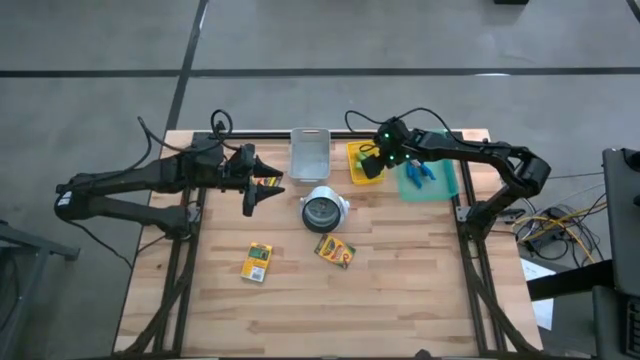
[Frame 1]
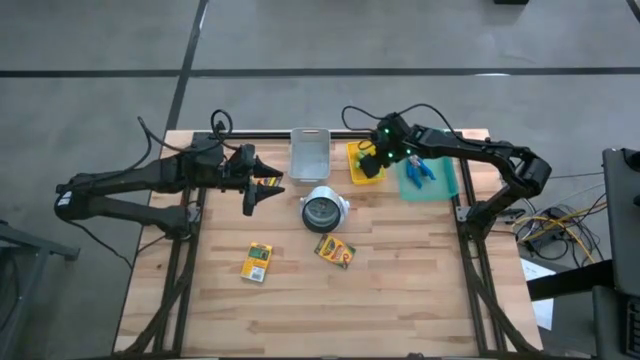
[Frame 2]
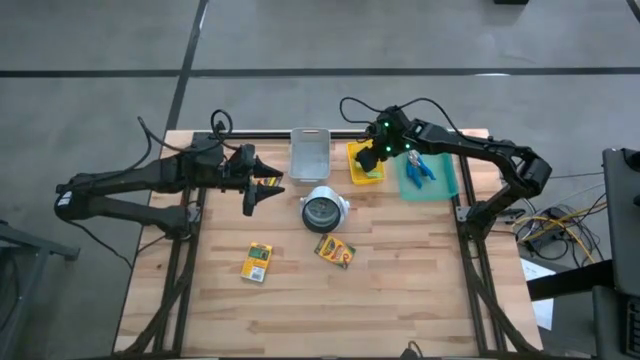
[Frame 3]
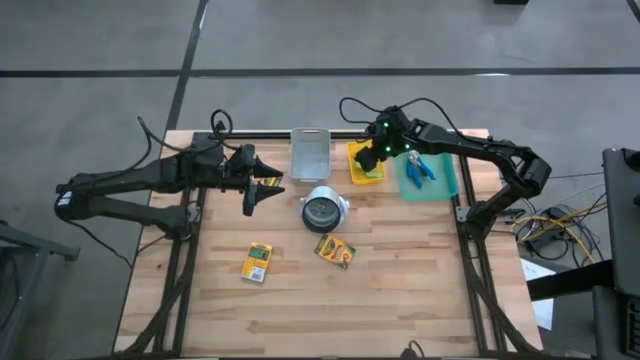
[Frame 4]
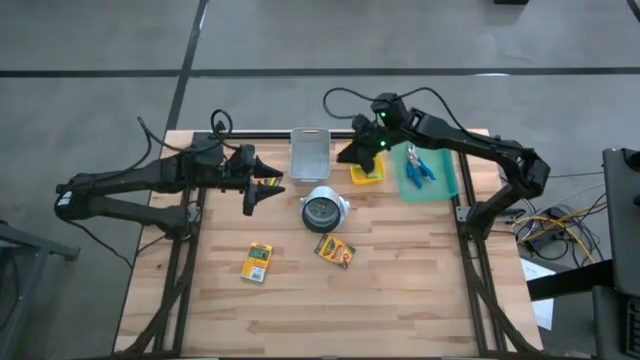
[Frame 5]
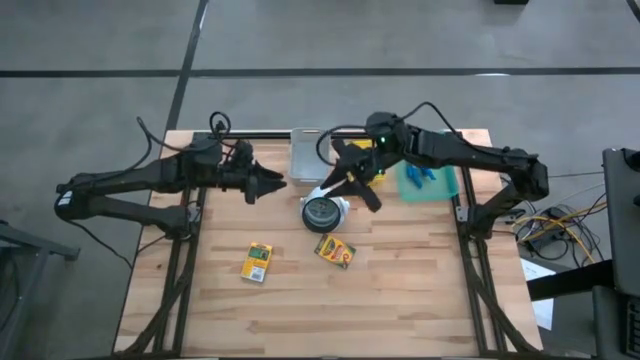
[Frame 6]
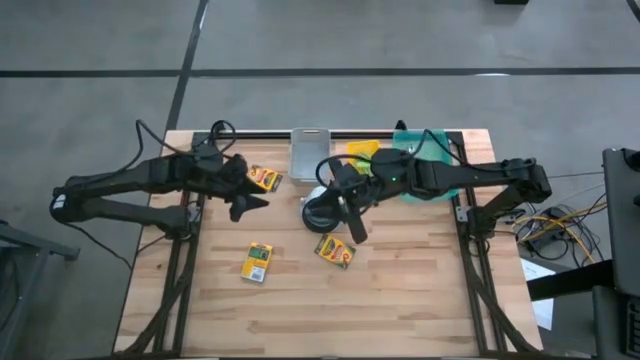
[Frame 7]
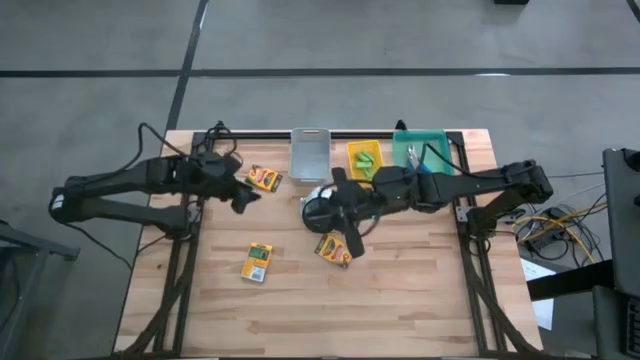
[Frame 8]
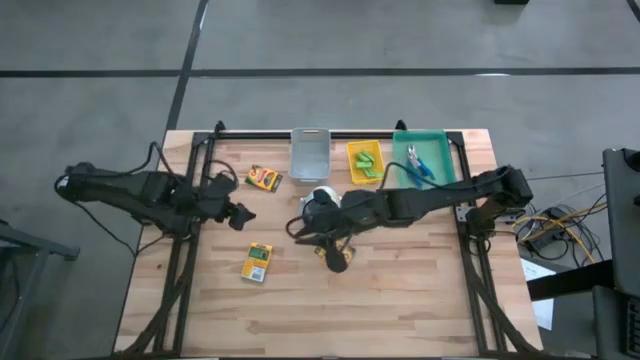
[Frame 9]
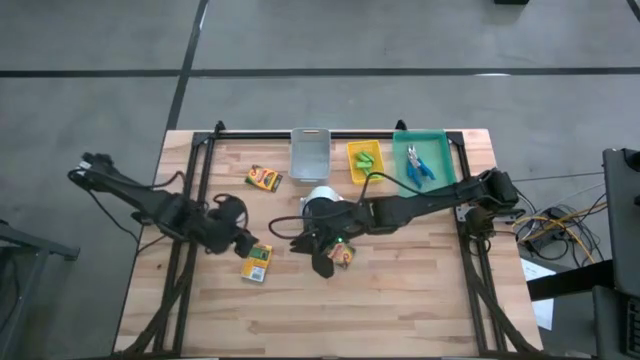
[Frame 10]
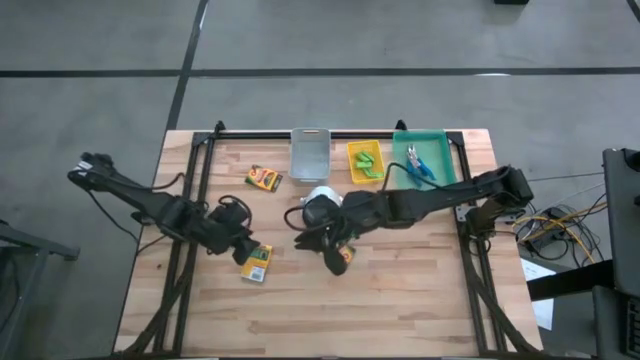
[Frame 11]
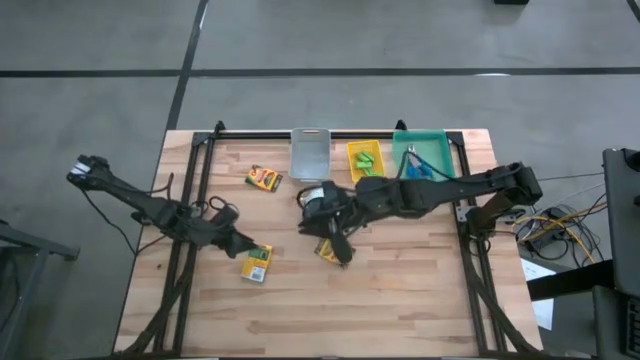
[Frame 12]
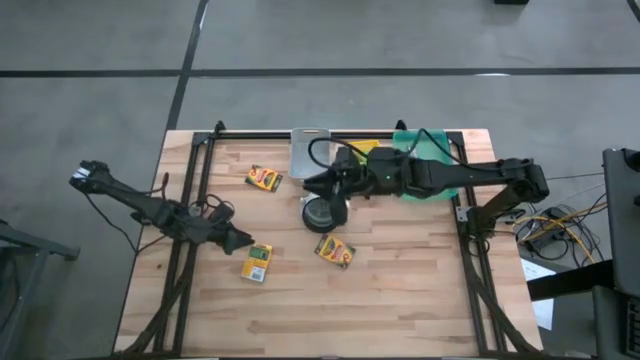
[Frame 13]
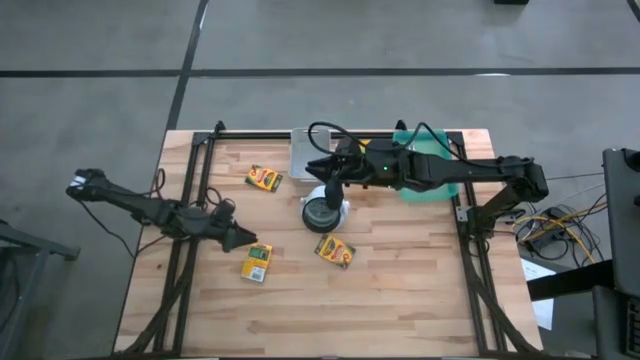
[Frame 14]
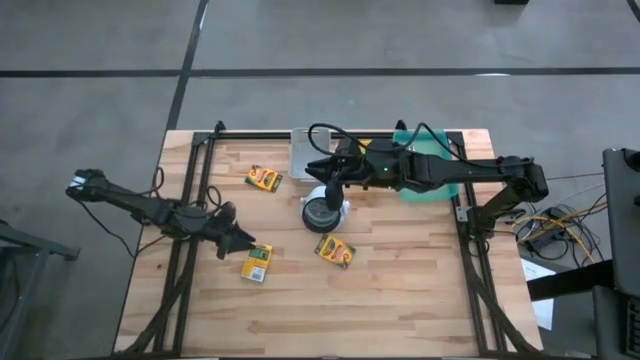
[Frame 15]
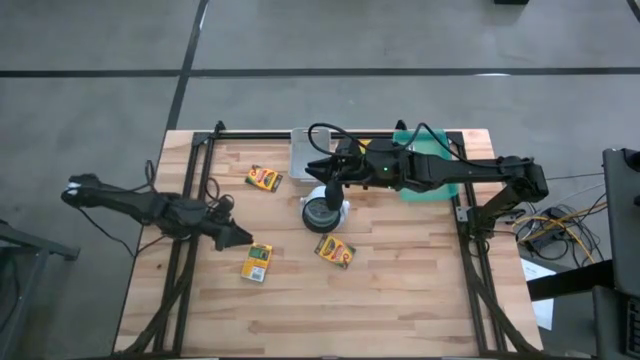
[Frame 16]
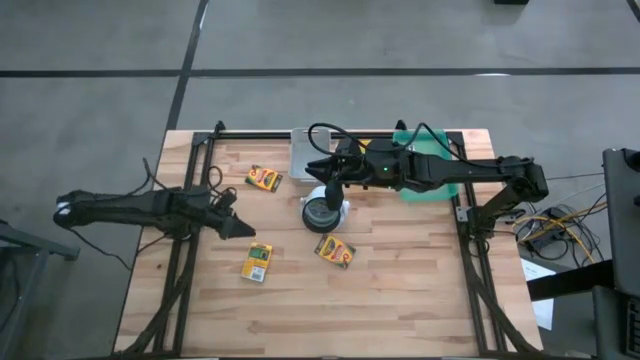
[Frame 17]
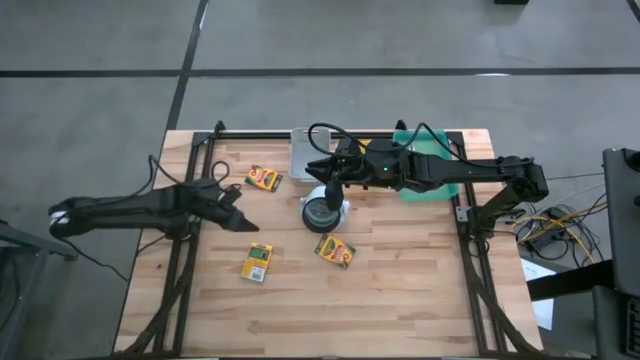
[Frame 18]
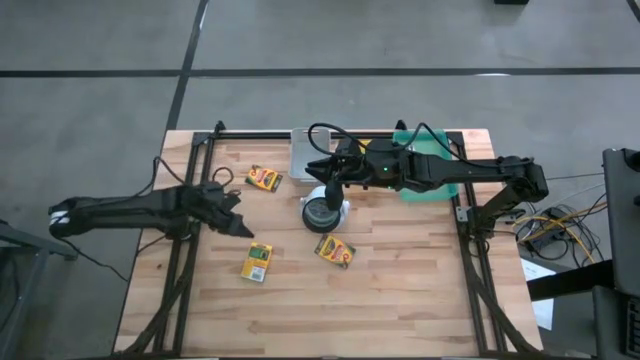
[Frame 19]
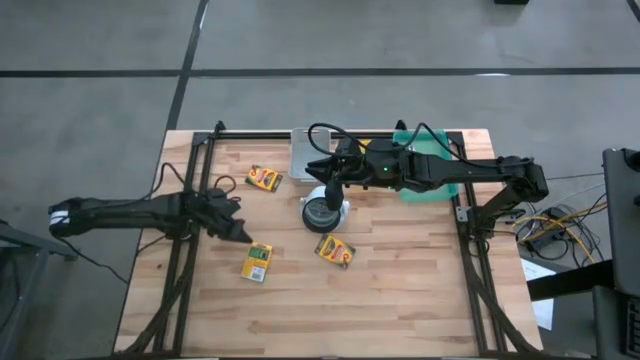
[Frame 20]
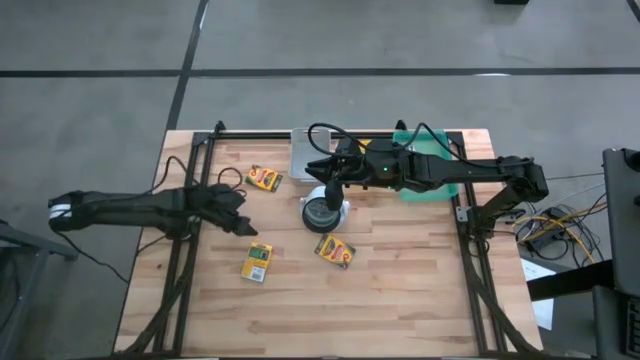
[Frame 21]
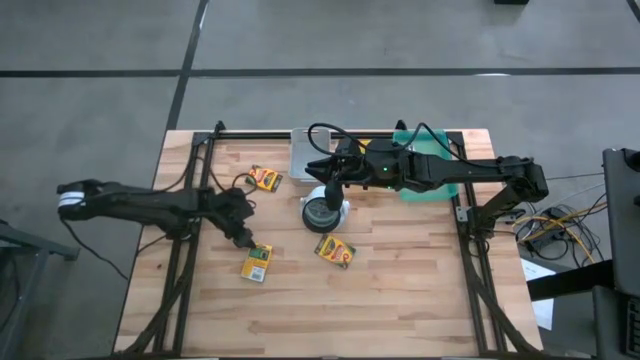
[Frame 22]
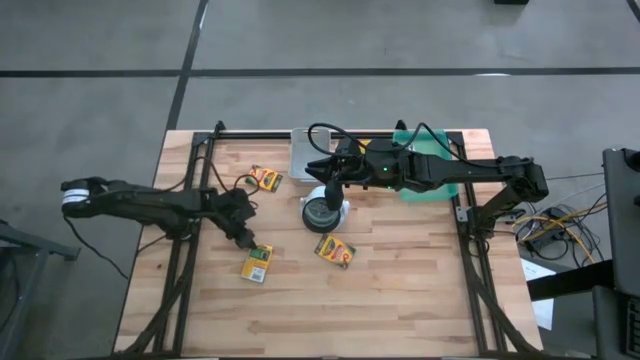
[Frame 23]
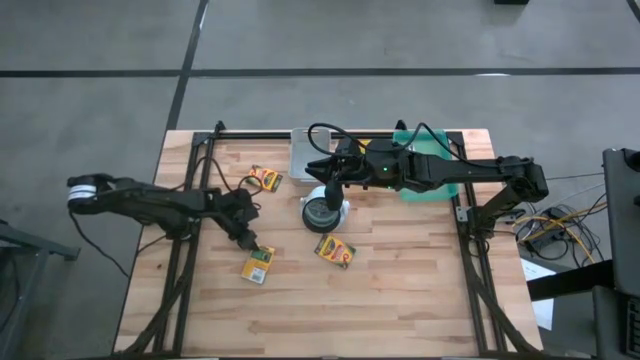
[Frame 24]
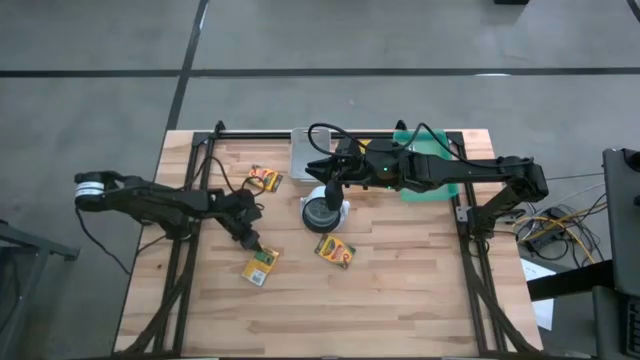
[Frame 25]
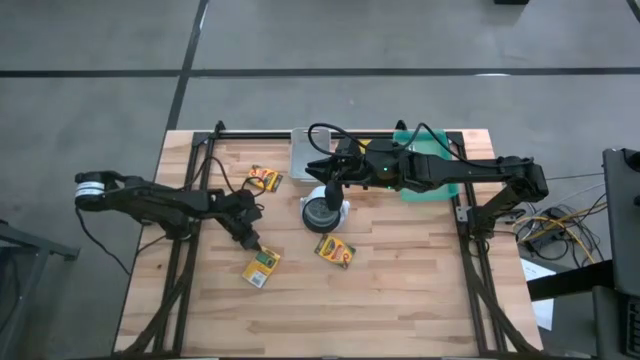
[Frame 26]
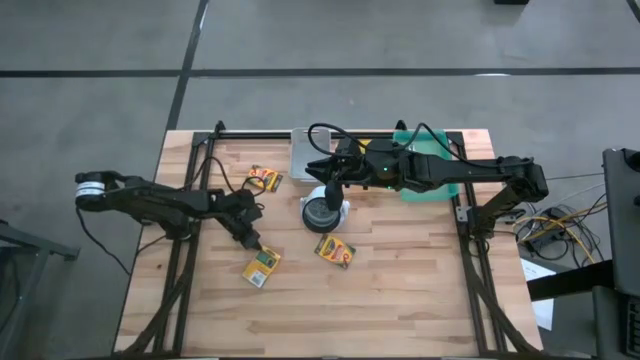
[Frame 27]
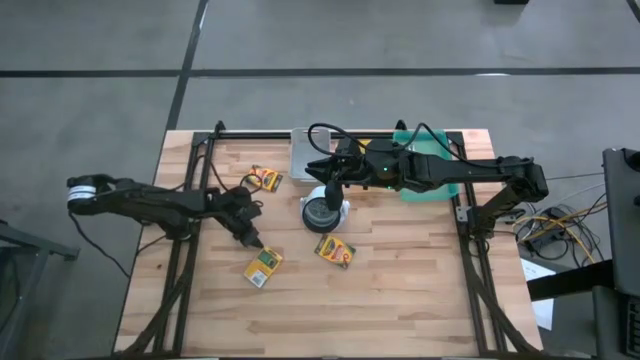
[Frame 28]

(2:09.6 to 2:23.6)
Task: Pick & Place School Supplies
Put the pack of crayon into the gray bin

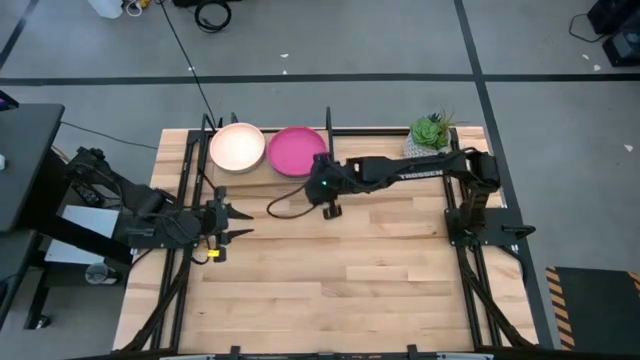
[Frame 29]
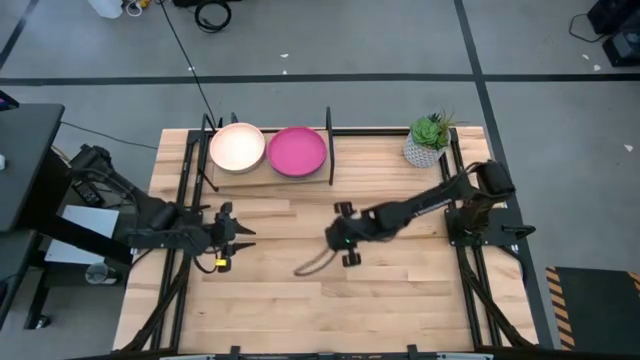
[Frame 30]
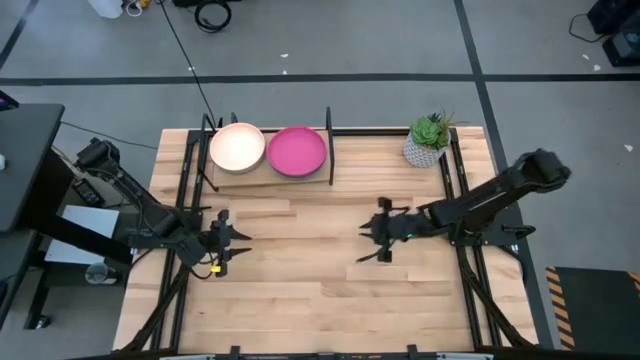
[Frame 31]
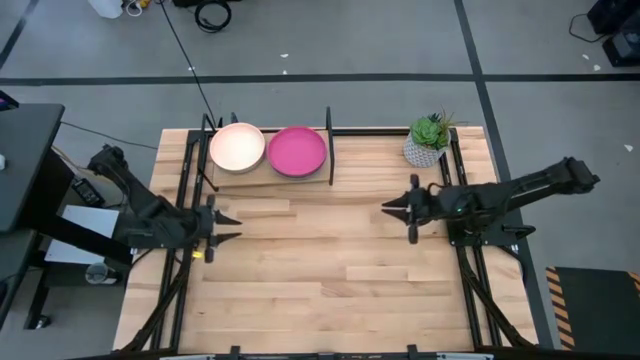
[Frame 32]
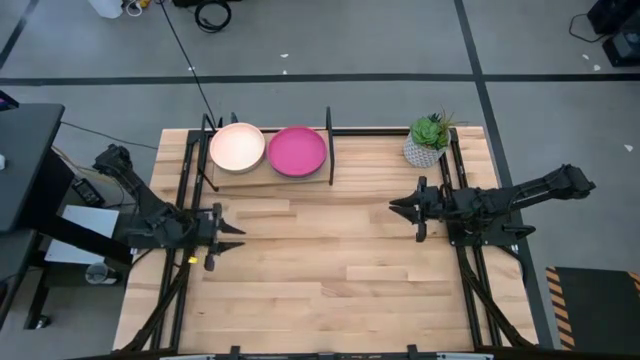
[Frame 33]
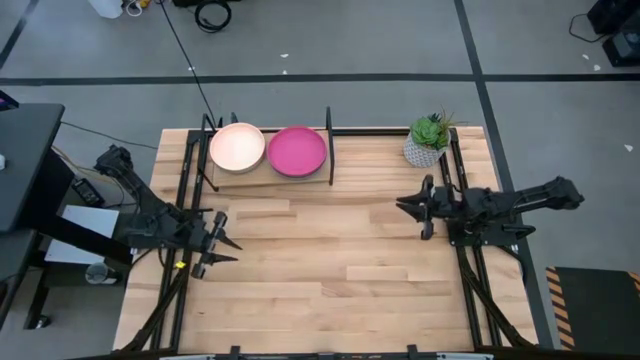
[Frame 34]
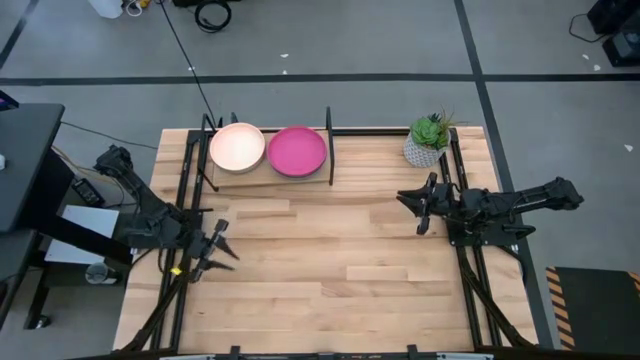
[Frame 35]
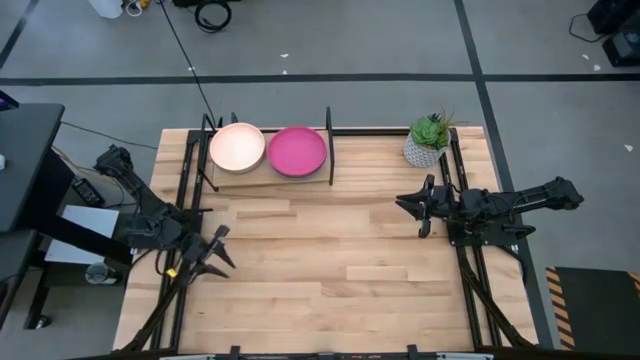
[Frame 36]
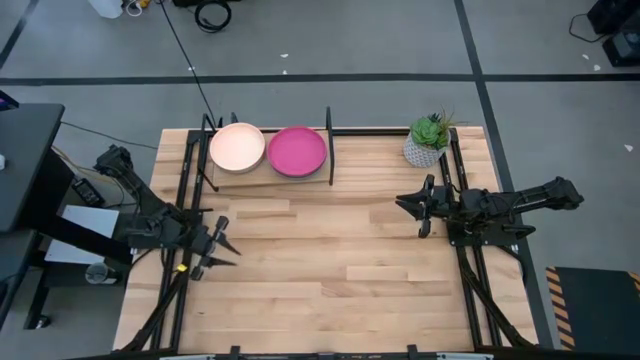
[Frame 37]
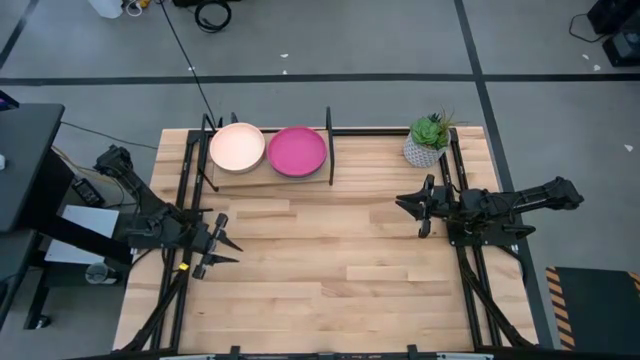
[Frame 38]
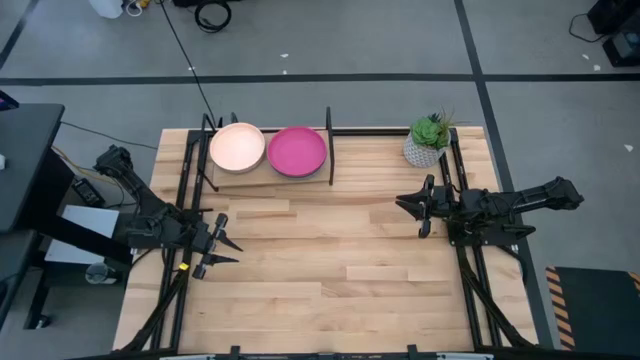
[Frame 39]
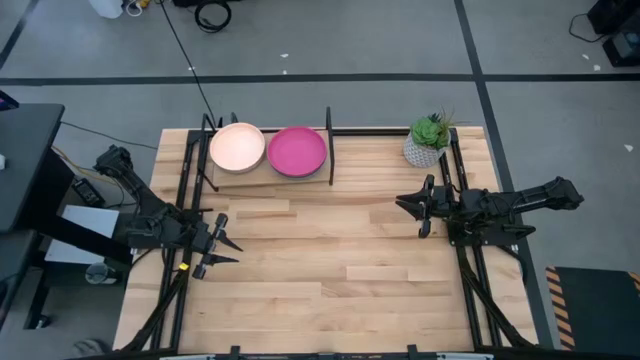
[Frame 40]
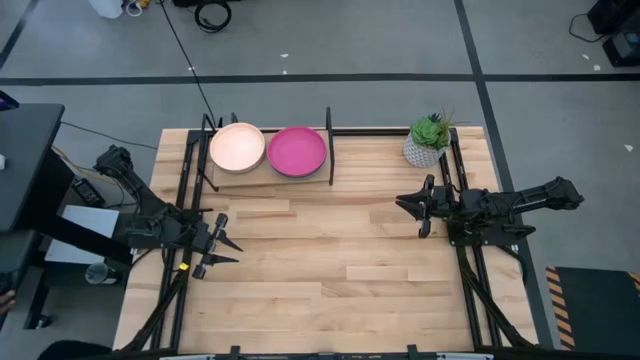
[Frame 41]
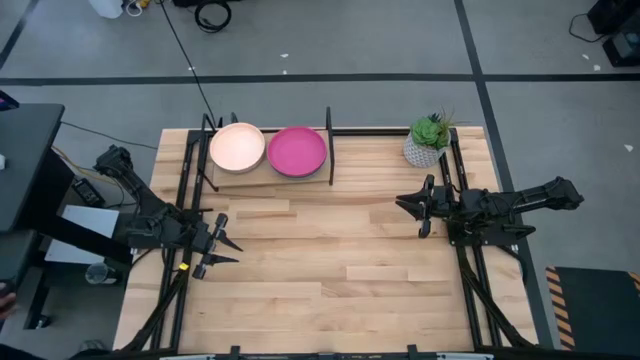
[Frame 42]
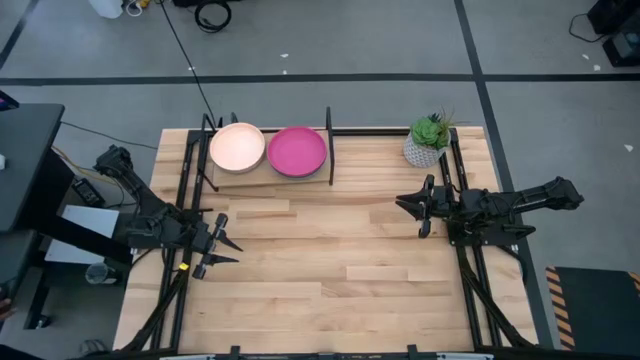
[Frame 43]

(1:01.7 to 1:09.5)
Task: Place and stack plates onto a shelf
Return to Home Position
